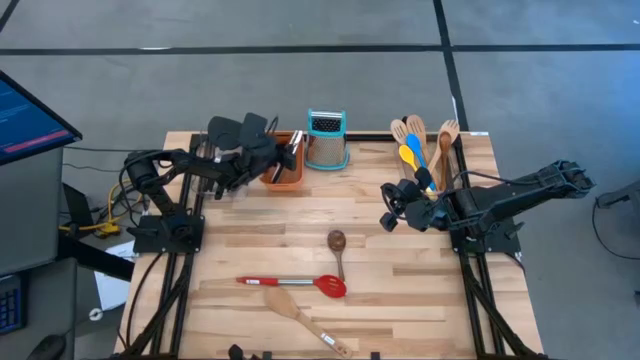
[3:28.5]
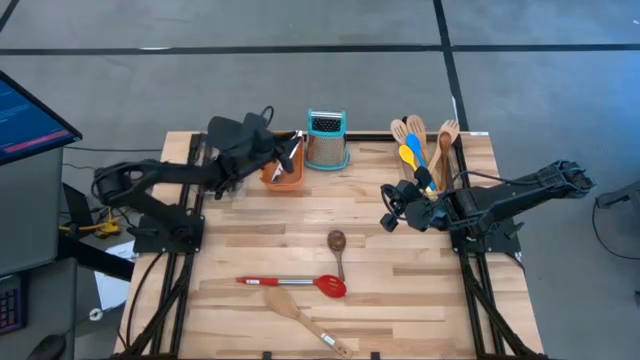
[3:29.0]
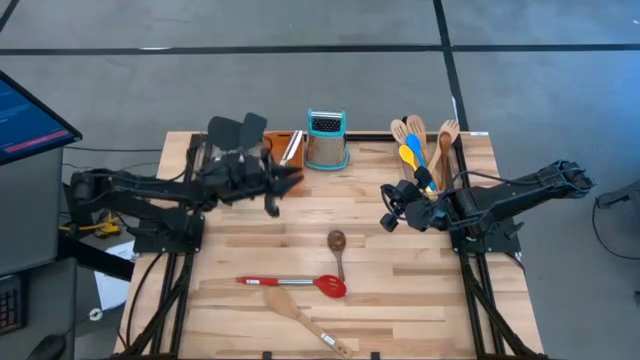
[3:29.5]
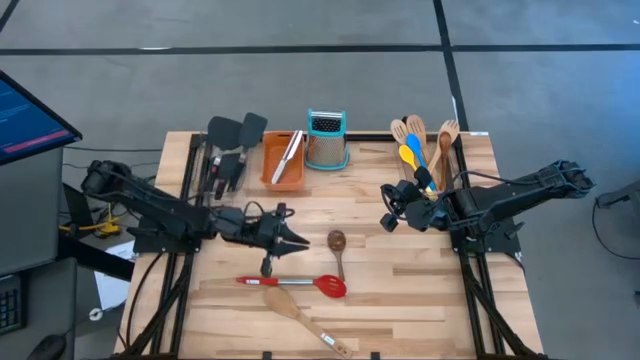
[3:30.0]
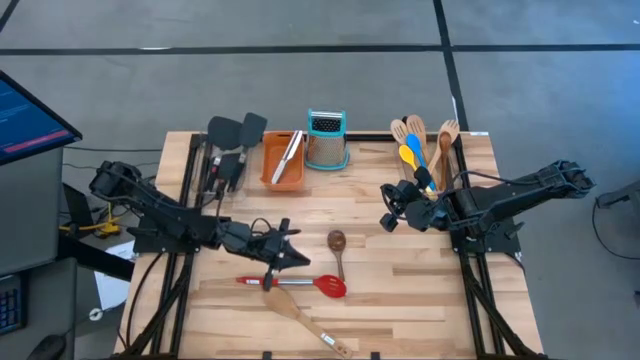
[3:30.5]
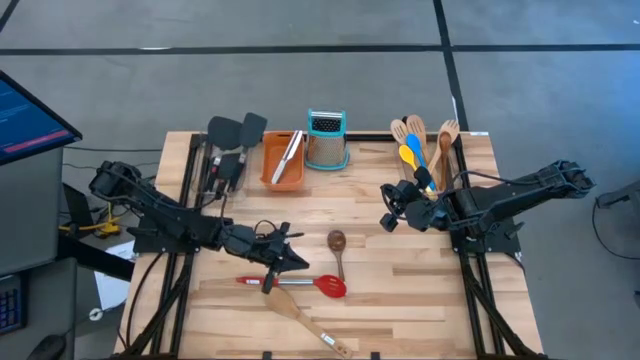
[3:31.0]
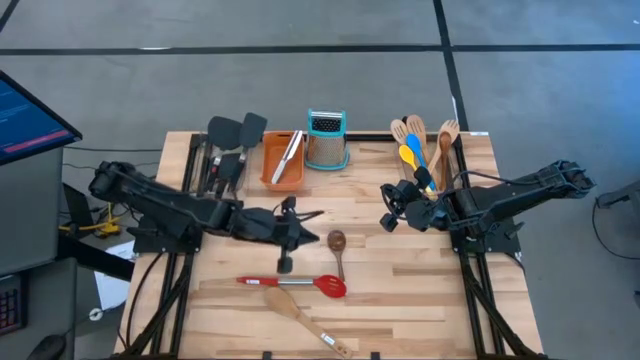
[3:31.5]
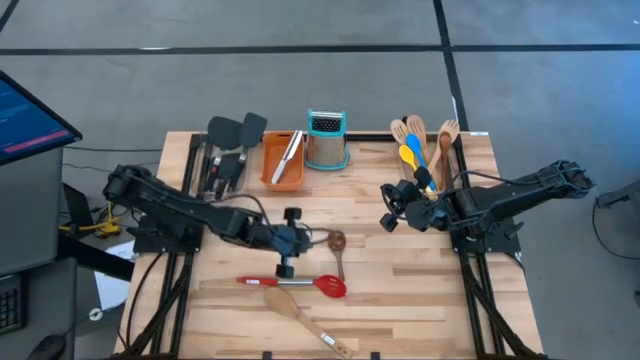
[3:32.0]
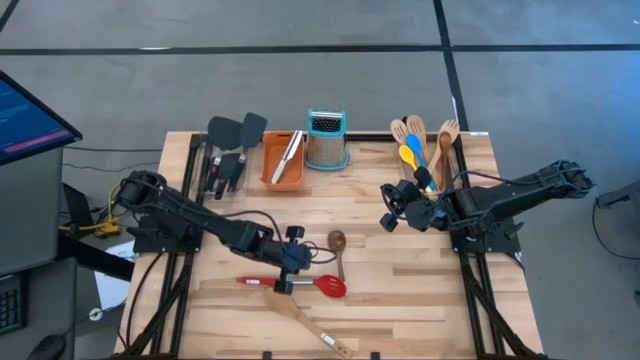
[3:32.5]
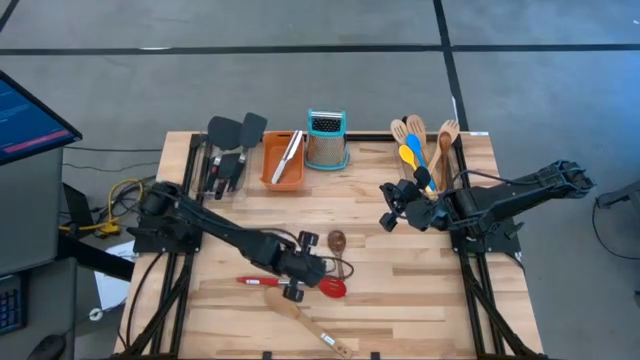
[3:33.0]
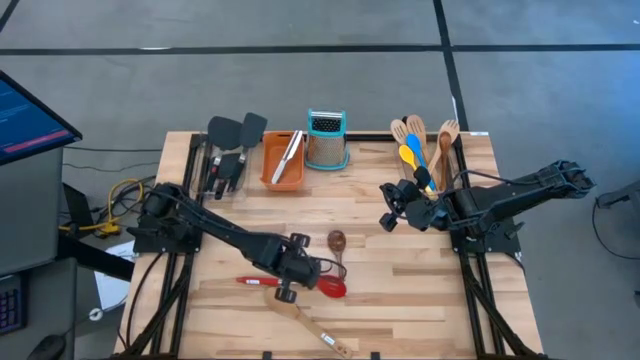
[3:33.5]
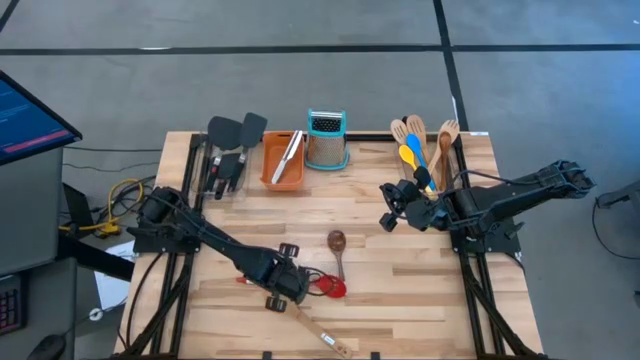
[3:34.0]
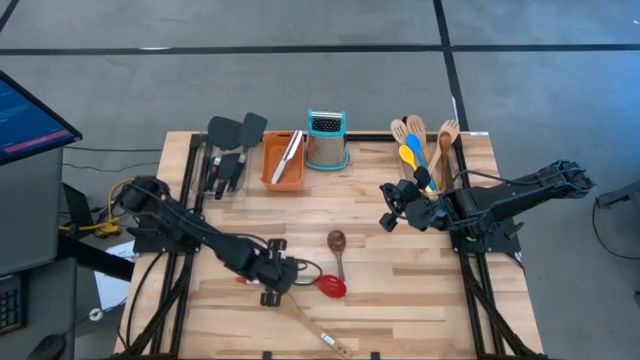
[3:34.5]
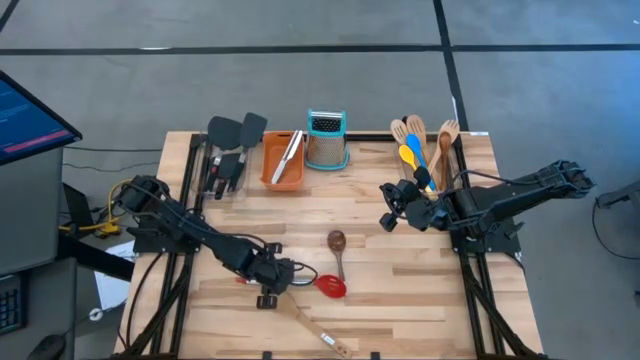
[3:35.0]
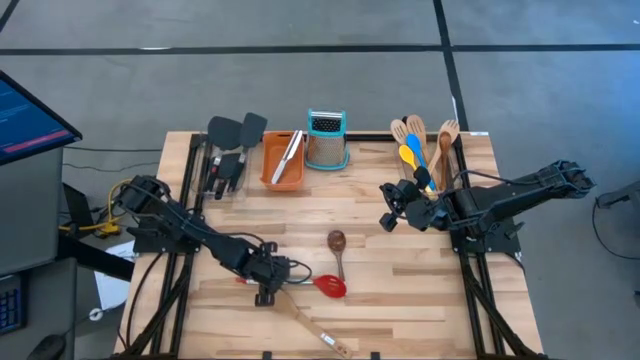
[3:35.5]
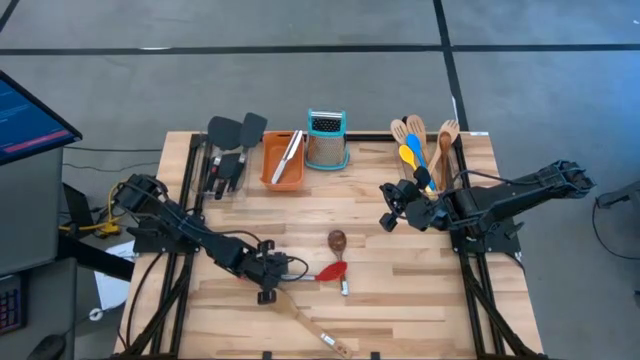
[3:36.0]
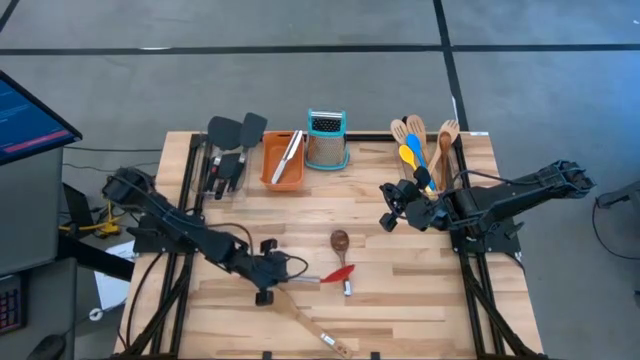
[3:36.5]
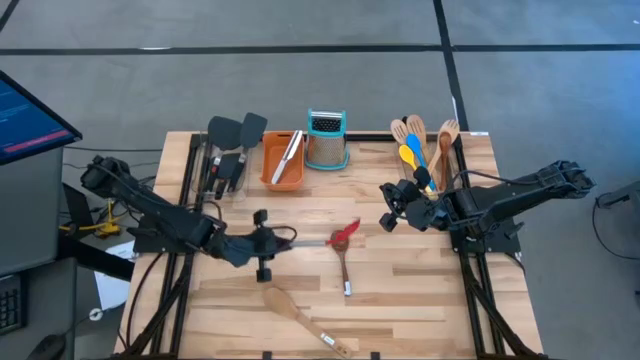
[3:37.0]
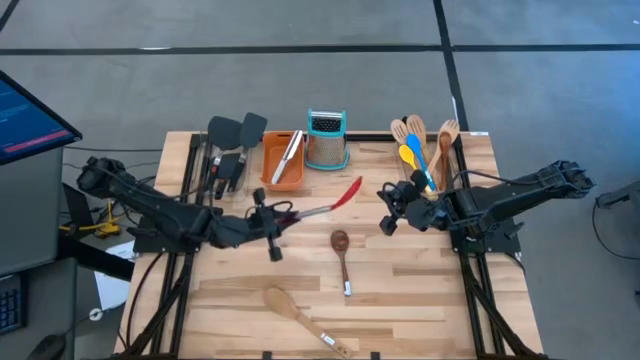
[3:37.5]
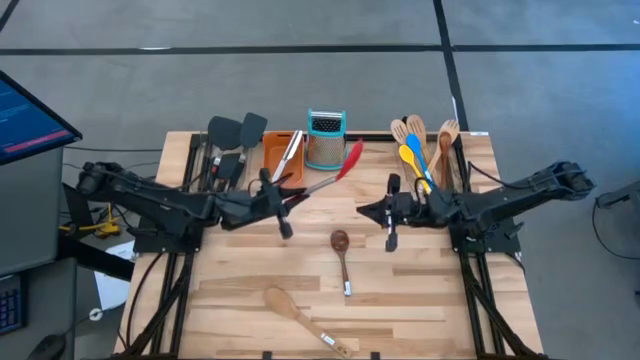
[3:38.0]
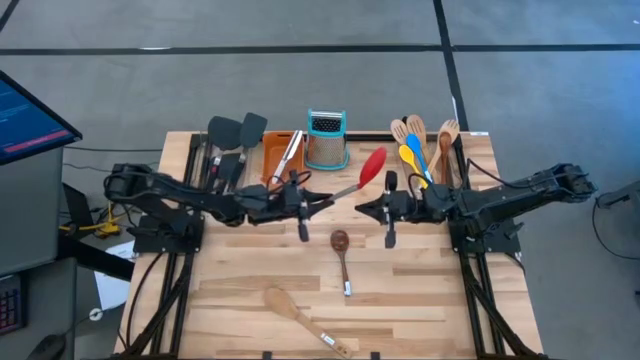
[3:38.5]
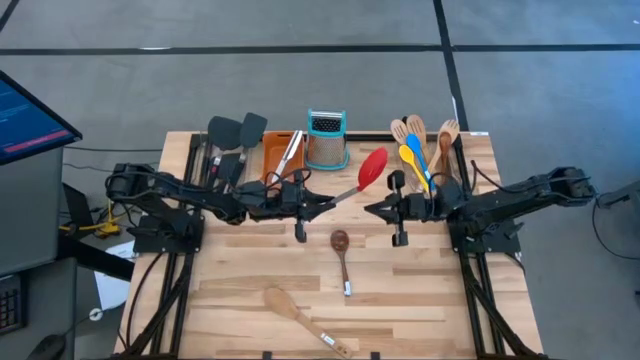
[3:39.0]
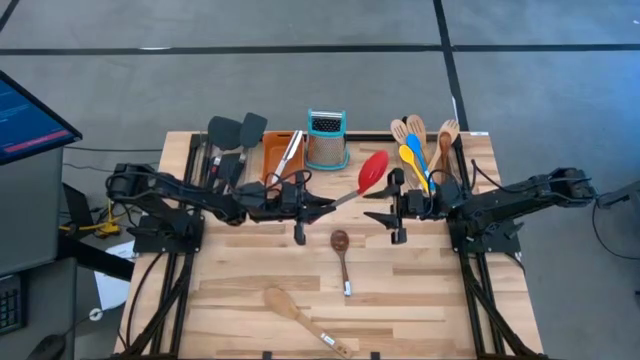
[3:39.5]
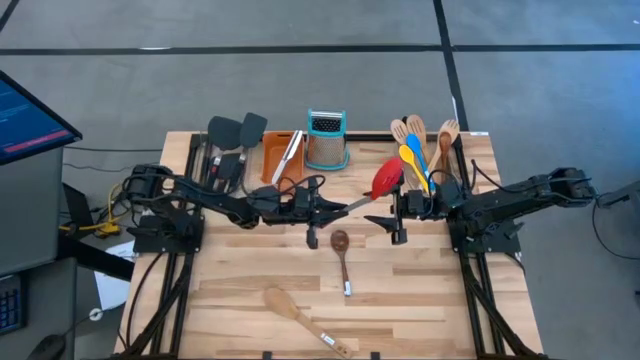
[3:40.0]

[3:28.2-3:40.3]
Task: Pick & Place Kitchen Items
Put the red spoon into the right transparent bin

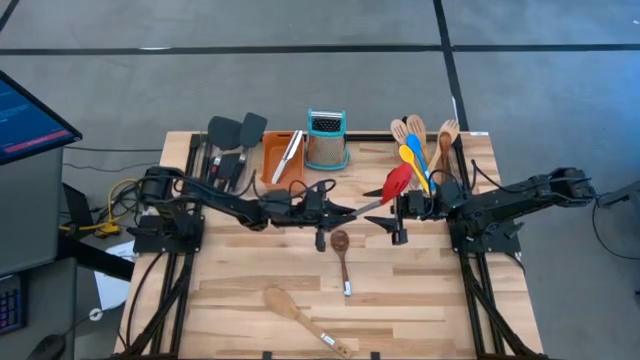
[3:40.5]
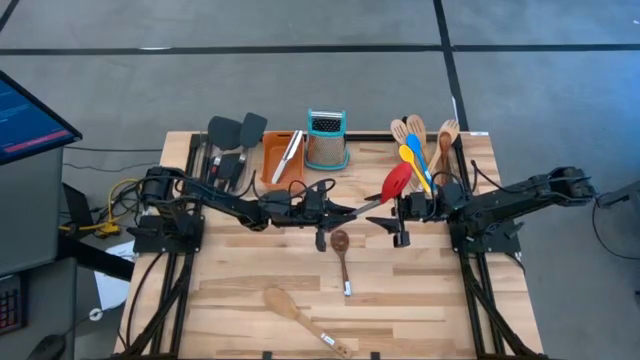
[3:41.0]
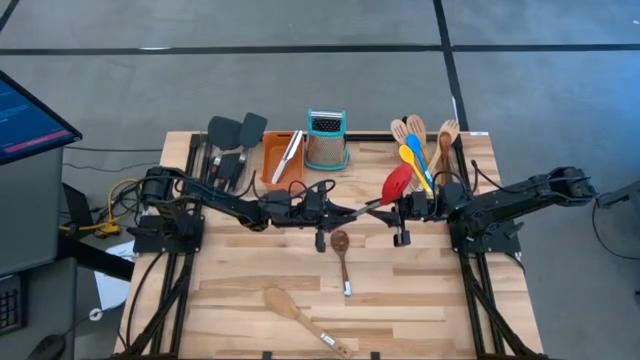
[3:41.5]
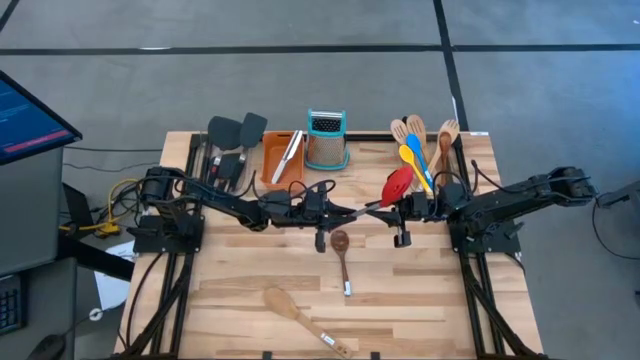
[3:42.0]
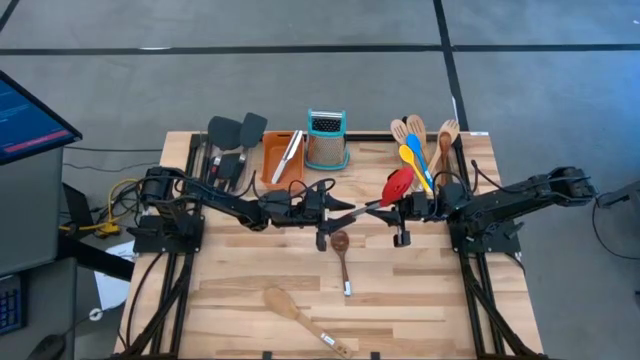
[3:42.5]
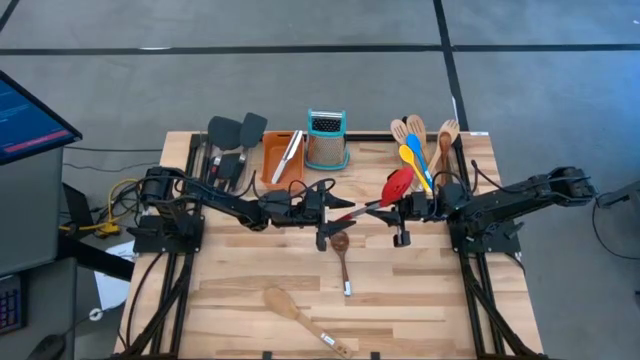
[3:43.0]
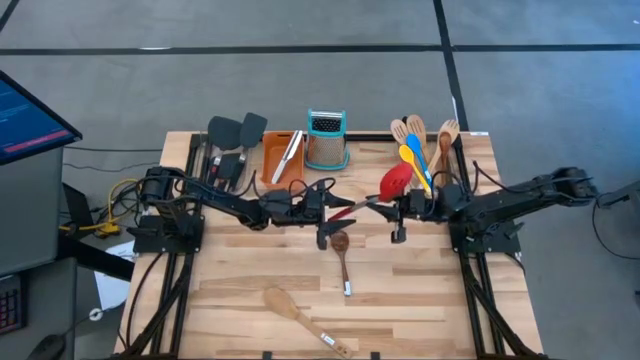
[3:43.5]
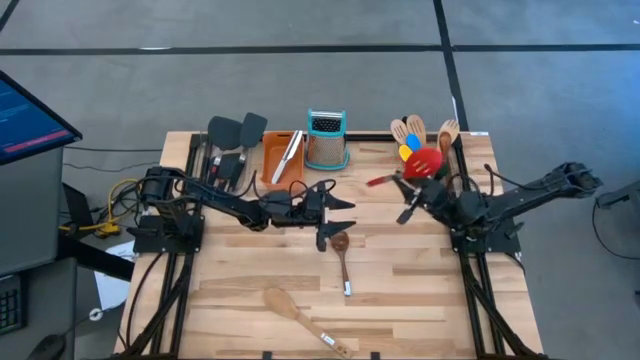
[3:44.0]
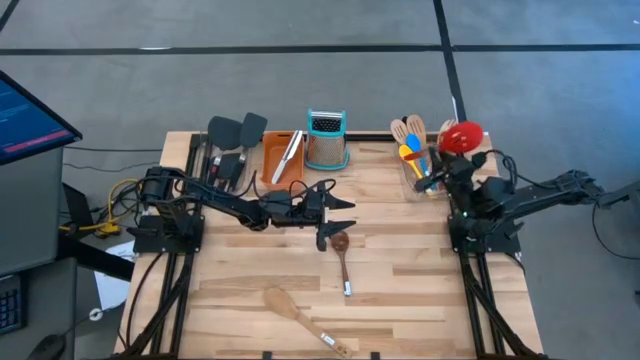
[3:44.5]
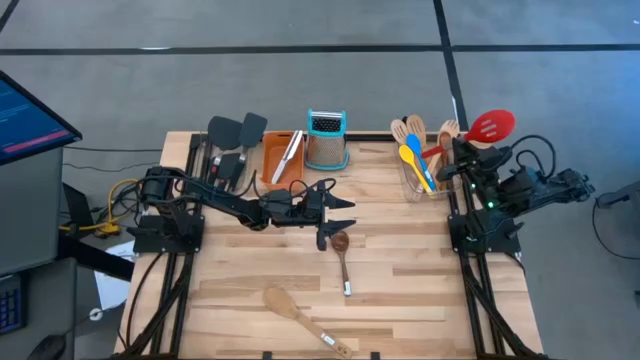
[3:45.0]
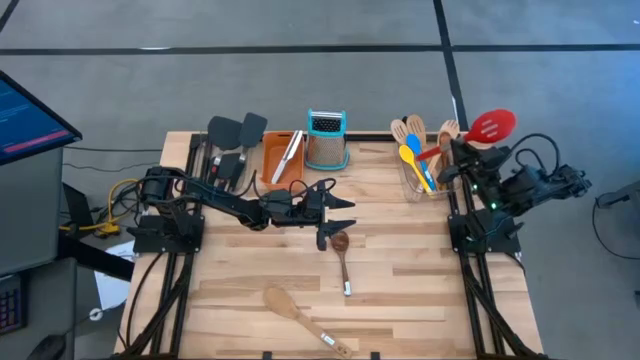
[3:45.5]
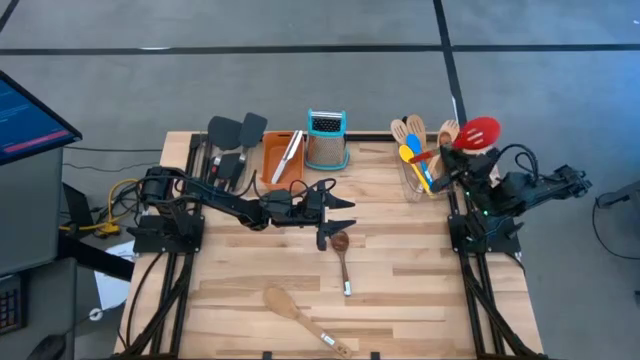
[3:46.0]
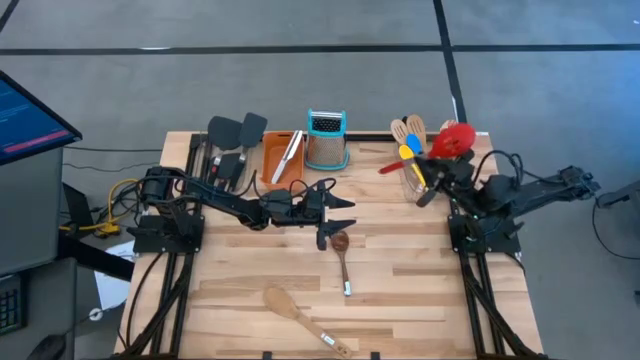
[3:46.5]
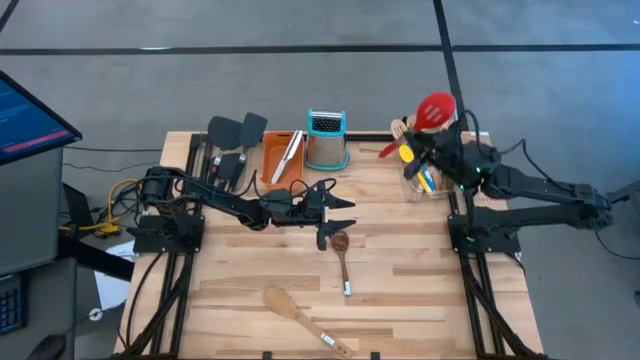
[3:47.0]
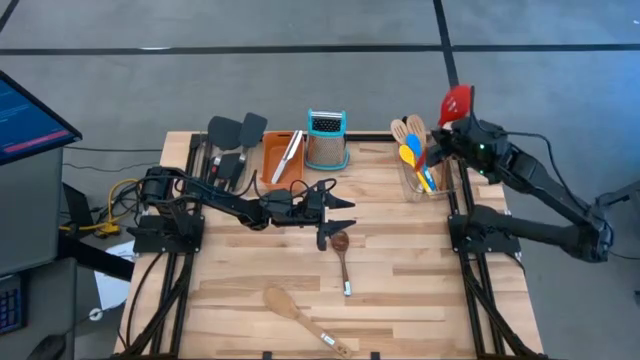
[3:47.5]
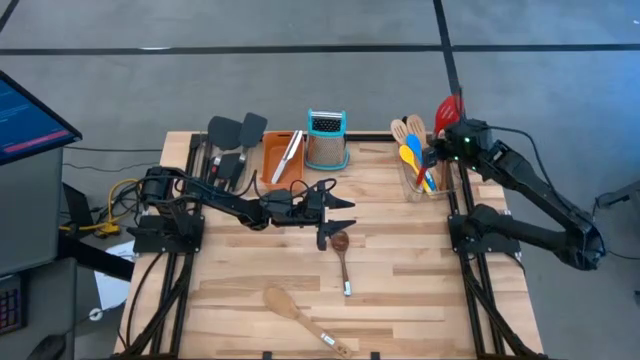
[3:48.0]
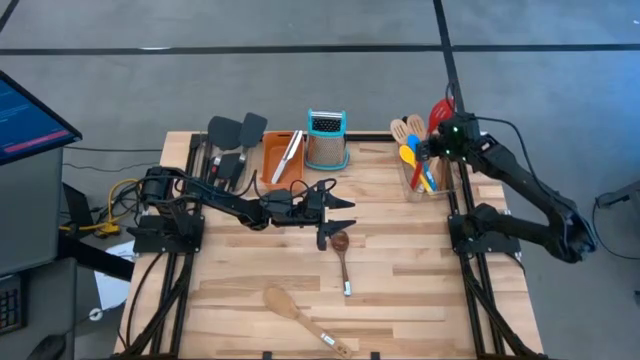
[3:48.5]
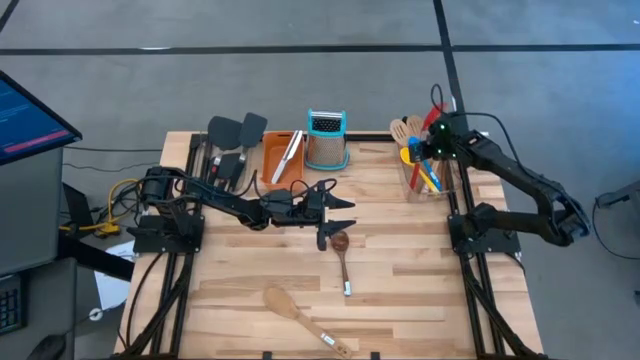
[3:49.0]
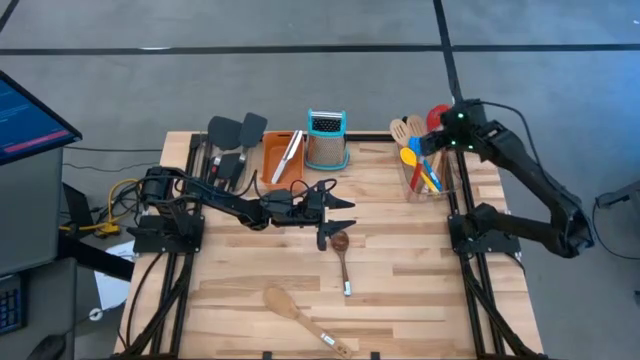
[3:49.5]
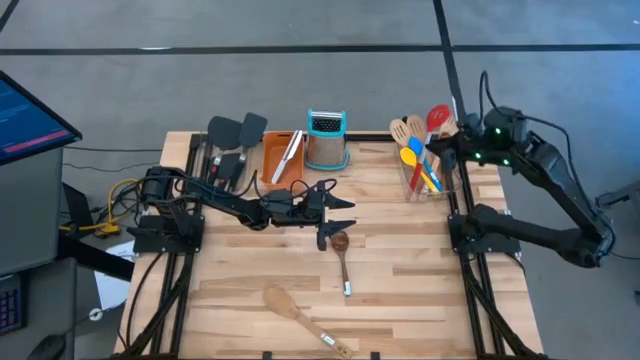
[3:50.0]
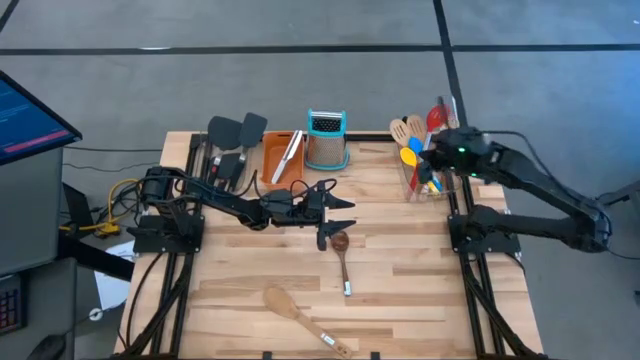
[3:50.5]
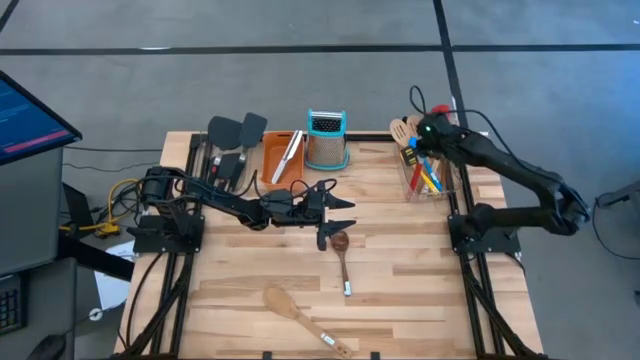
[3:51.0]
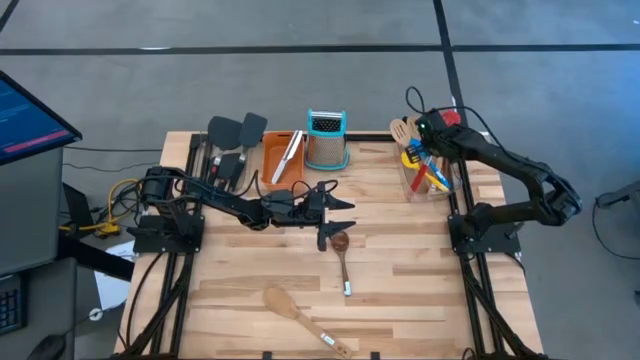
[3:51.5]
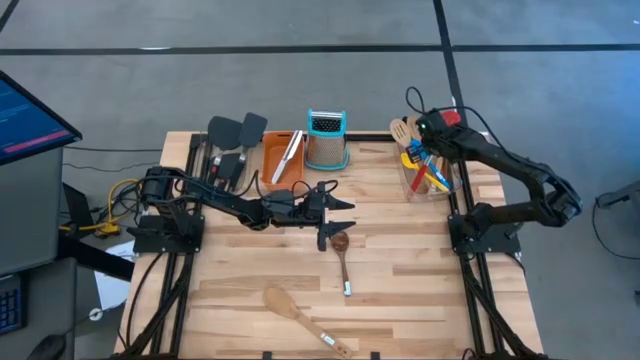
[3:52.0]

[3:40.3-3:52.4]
Put the red spoon into the right transparent bin
